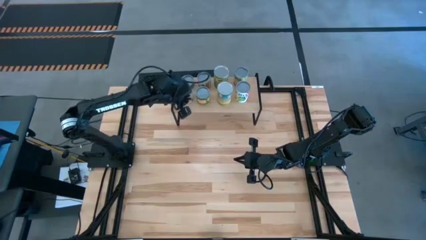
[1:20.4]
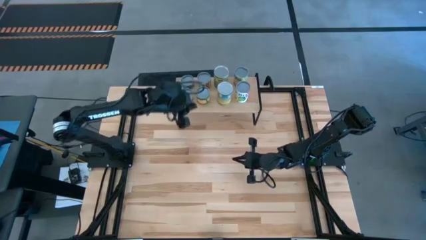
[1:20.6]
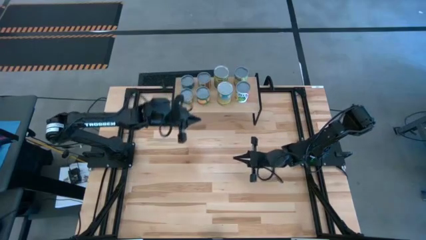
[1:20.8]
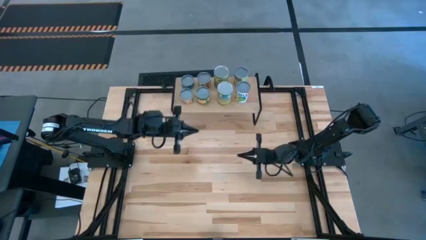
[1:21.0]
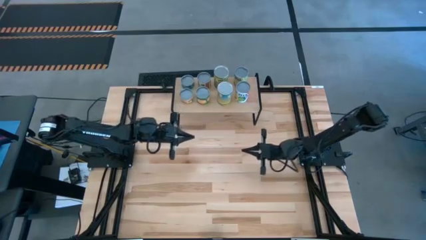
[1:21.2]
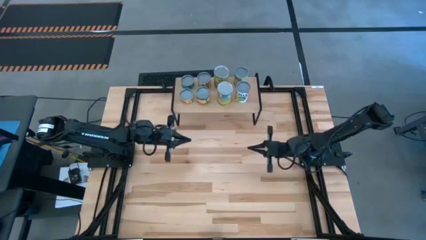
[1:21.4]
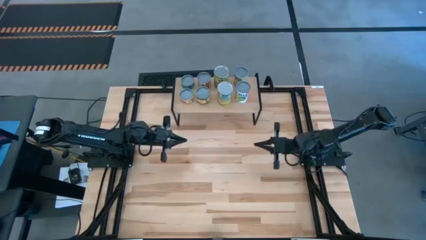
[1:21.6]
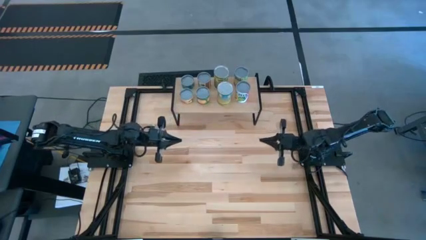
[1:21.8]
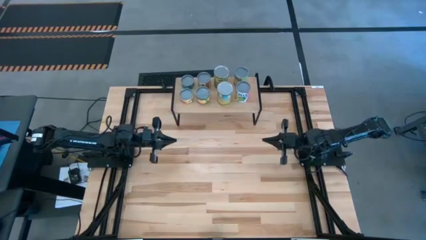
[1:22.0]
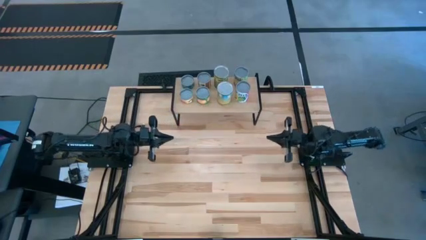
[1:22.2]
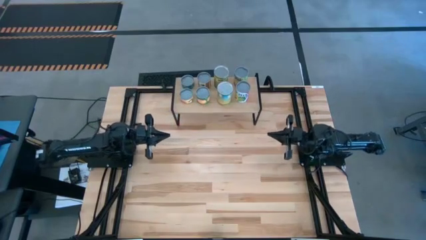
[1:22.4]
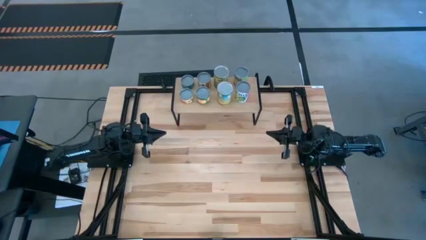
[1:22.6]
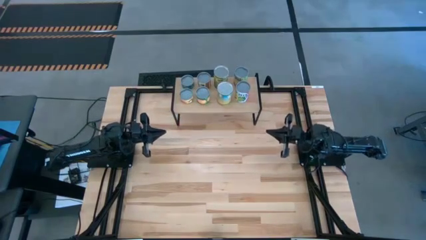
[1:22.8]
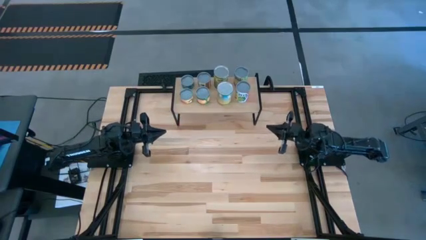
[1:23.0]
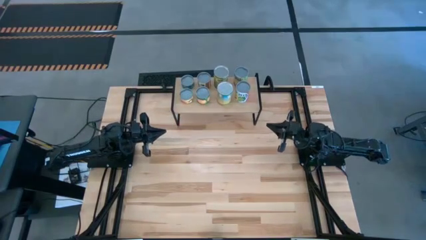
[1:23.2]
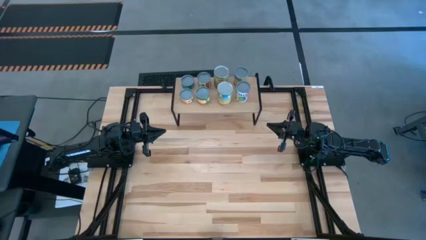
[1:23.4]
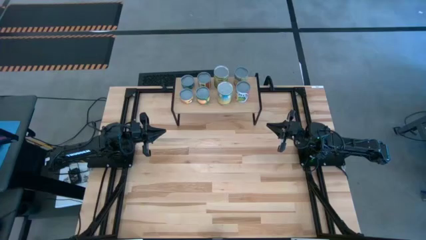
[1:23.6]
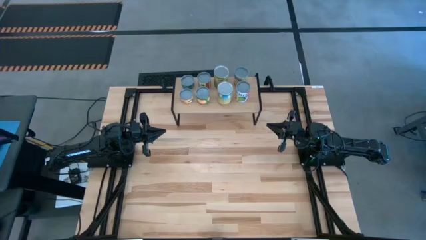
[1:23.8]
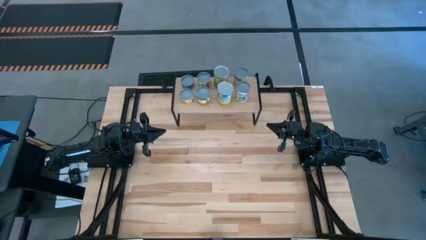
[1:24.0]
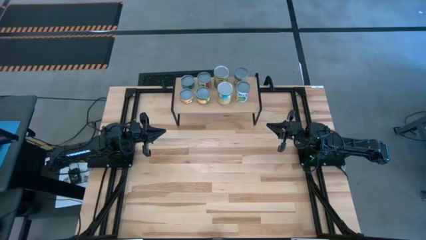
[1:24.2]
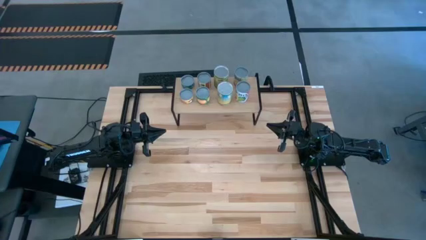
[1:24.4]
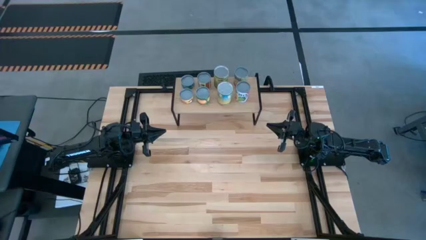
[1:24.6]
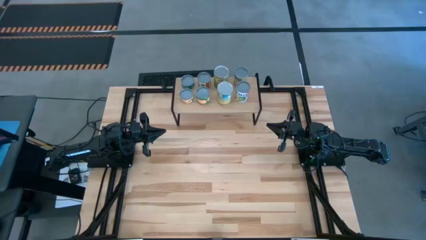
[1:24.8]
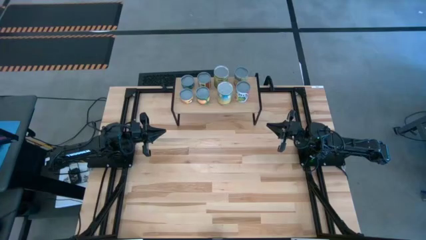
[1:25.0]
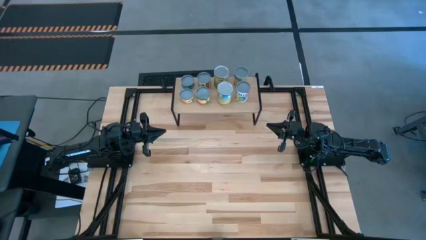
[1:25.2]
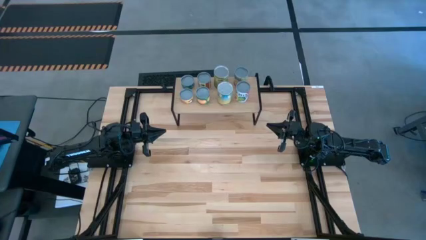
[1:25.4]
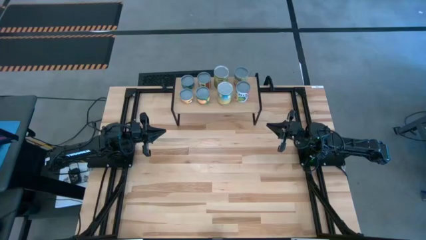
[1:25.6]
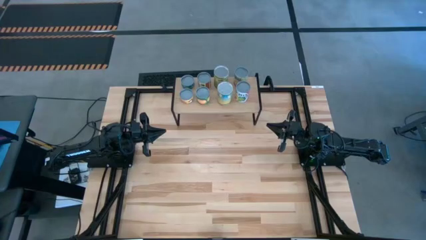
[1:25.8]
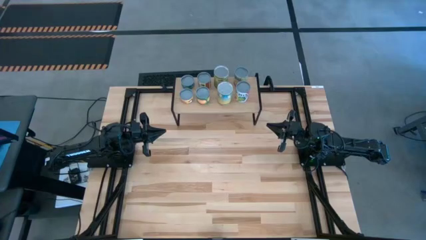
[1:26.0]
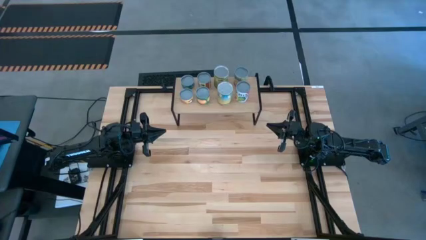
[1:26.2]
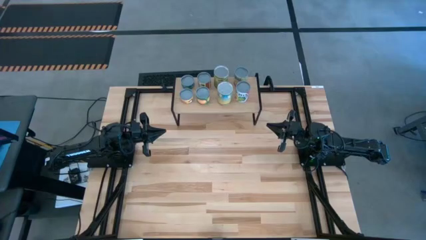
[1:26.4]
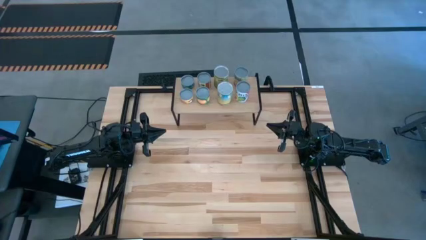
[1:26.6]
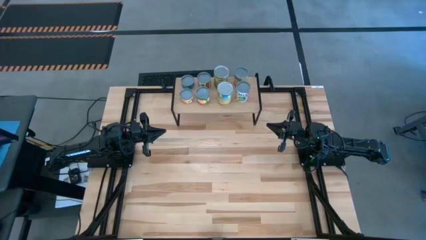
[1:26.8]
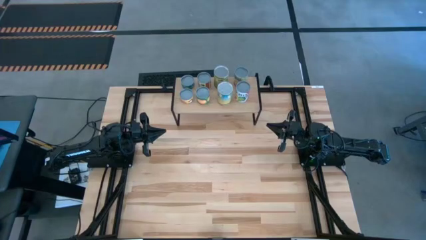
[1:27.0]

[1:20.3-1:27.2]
Task: Pick and place cans onto a shelf
Return to Home Position

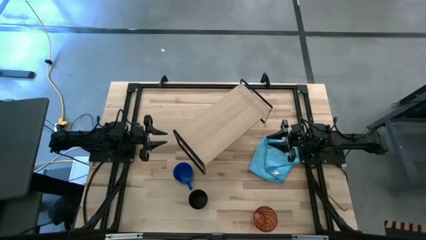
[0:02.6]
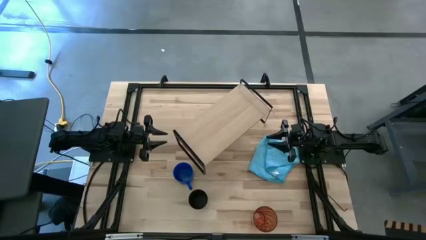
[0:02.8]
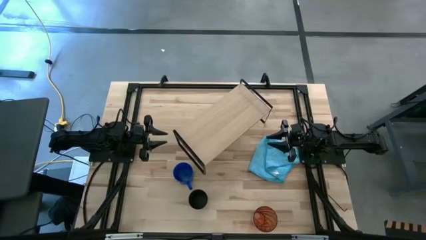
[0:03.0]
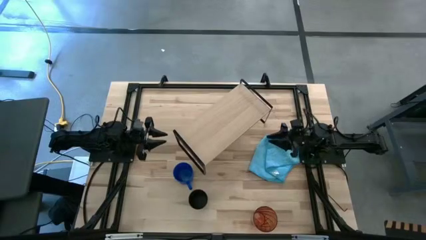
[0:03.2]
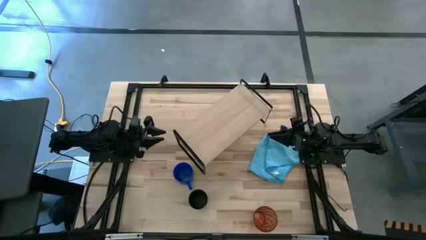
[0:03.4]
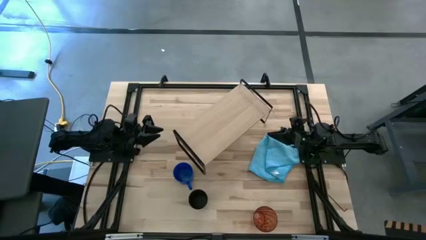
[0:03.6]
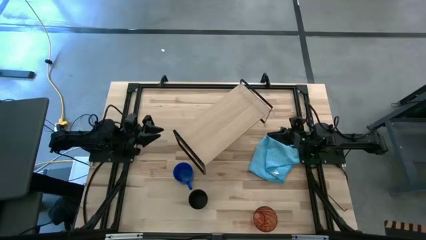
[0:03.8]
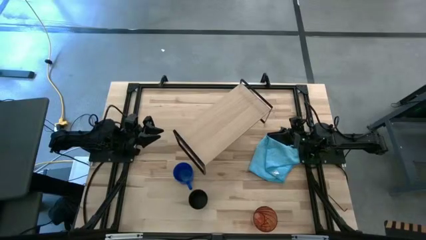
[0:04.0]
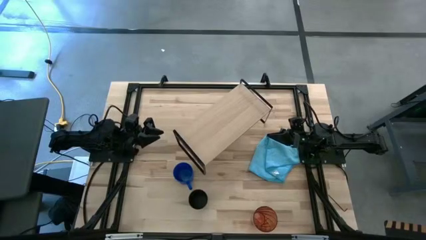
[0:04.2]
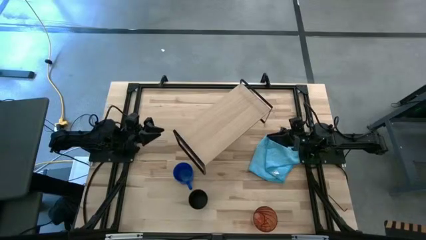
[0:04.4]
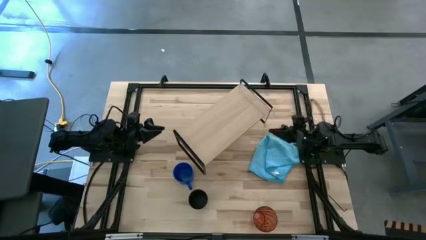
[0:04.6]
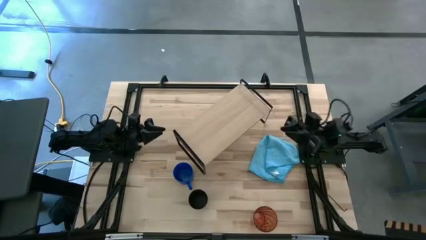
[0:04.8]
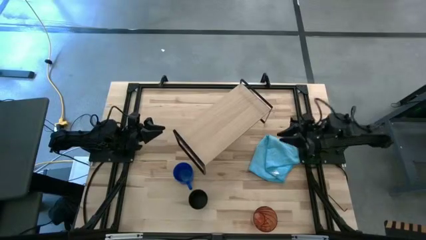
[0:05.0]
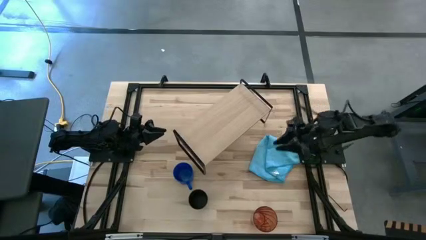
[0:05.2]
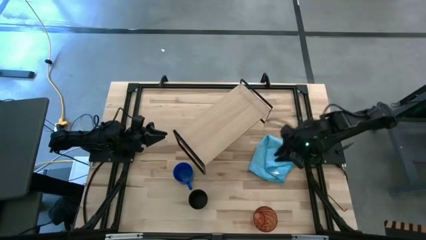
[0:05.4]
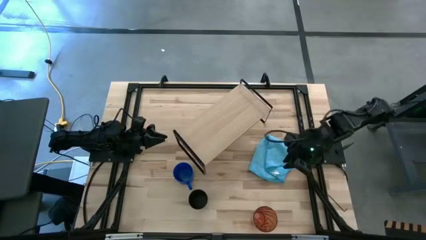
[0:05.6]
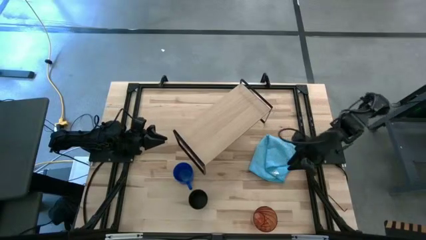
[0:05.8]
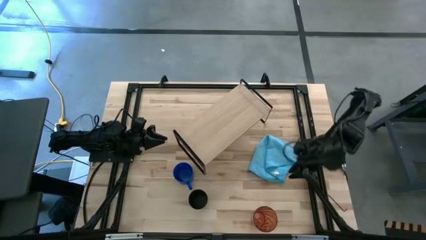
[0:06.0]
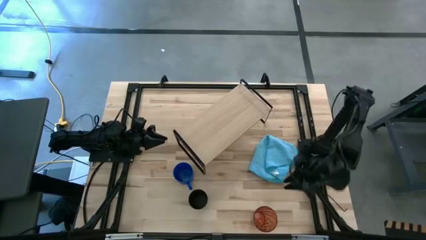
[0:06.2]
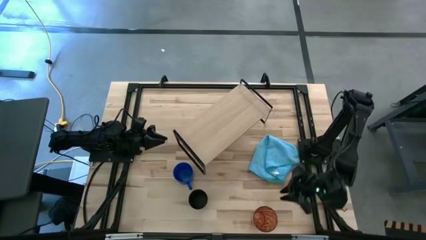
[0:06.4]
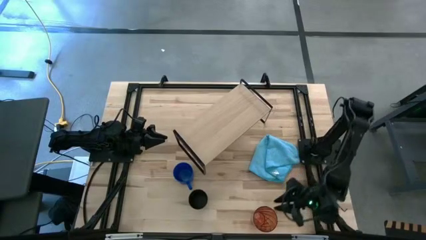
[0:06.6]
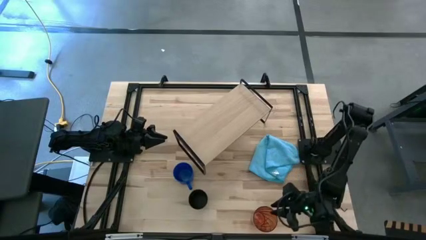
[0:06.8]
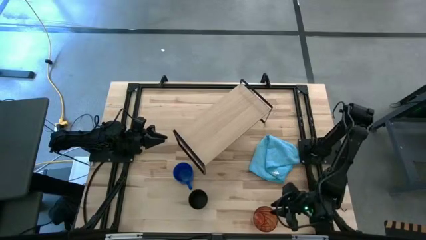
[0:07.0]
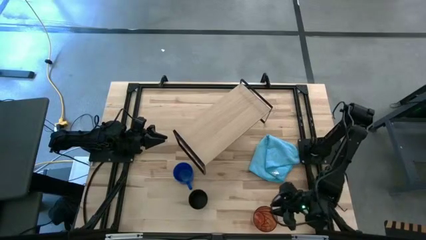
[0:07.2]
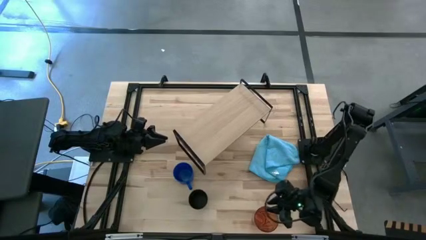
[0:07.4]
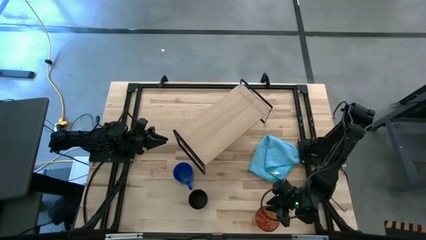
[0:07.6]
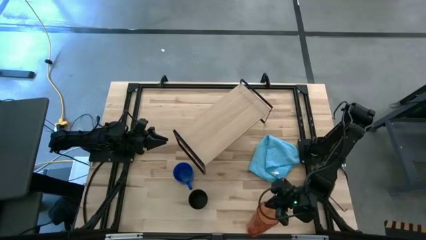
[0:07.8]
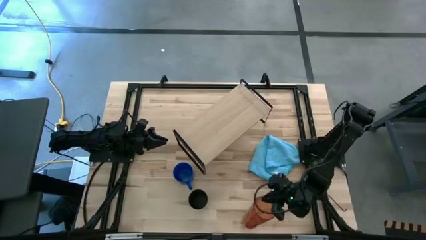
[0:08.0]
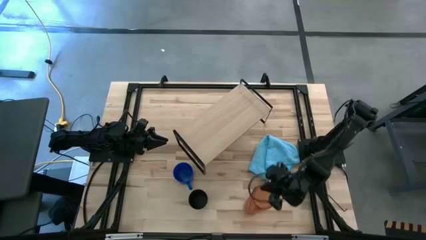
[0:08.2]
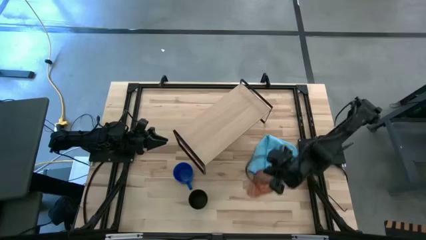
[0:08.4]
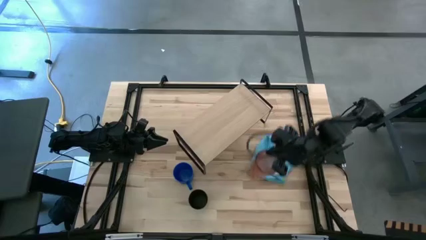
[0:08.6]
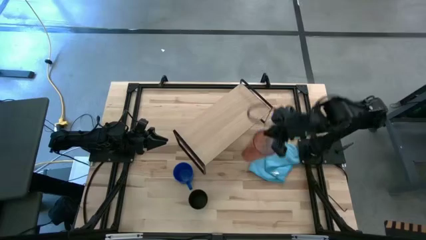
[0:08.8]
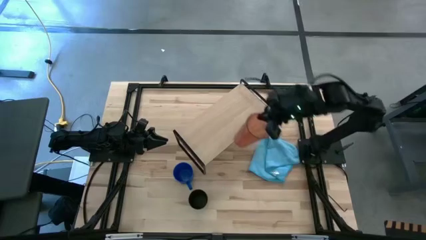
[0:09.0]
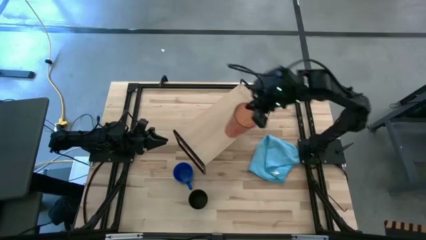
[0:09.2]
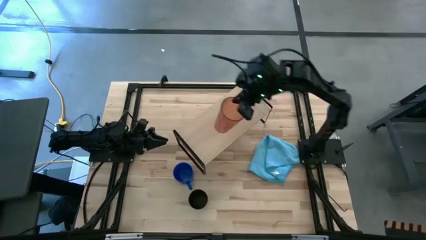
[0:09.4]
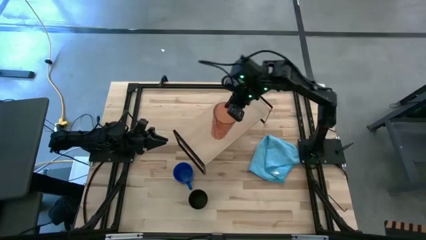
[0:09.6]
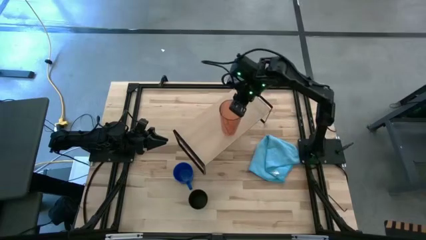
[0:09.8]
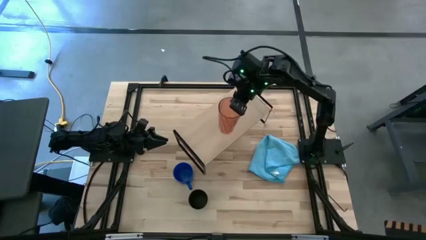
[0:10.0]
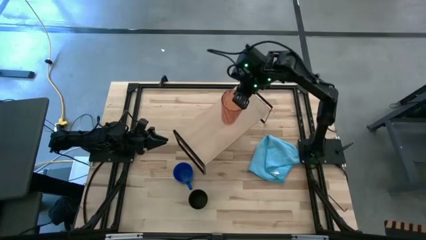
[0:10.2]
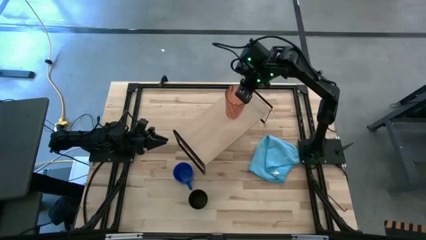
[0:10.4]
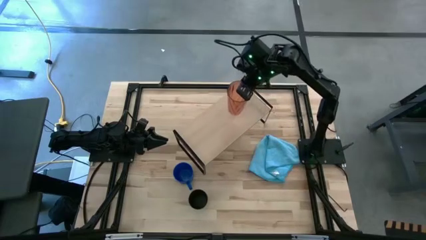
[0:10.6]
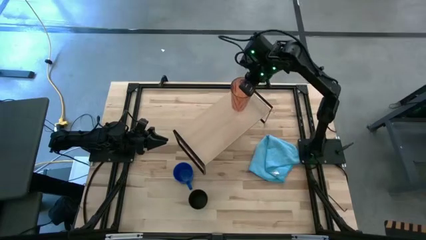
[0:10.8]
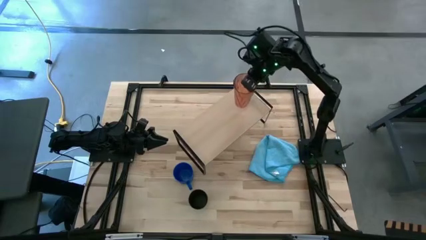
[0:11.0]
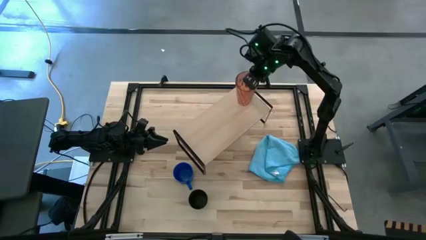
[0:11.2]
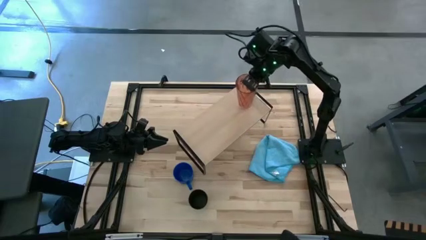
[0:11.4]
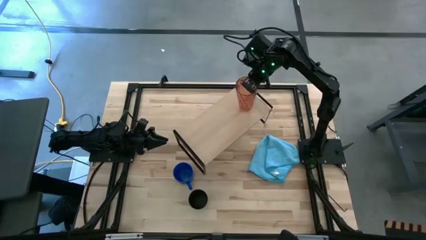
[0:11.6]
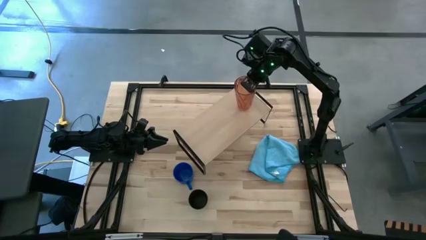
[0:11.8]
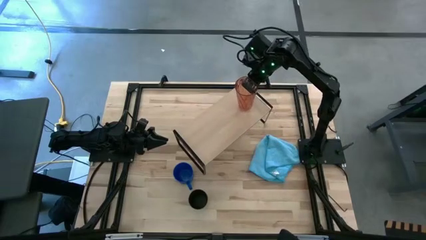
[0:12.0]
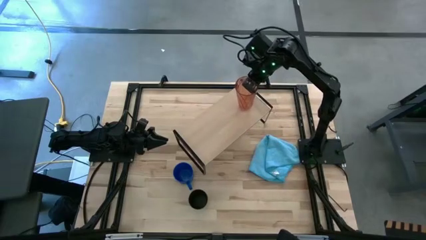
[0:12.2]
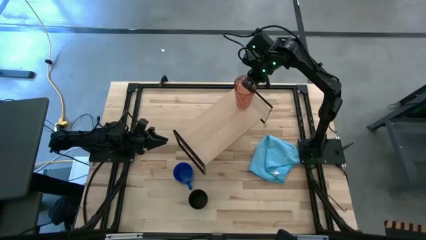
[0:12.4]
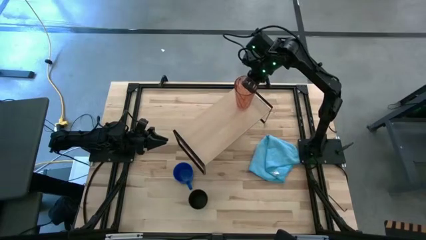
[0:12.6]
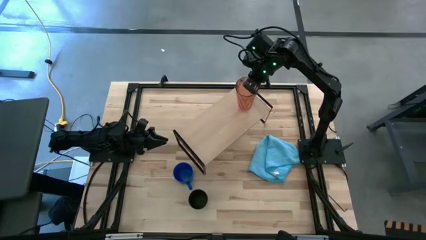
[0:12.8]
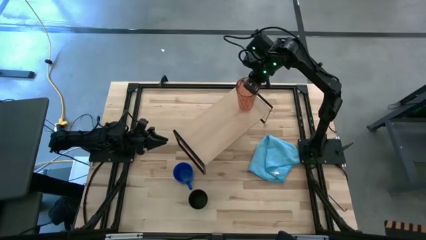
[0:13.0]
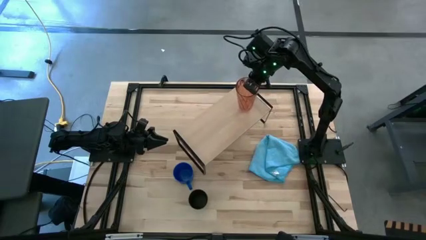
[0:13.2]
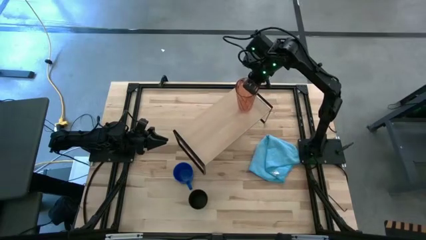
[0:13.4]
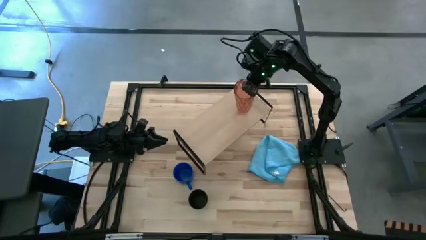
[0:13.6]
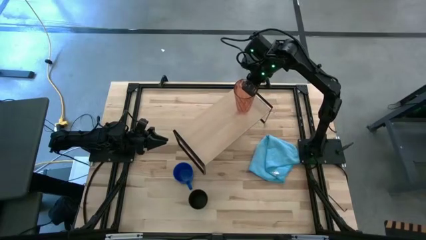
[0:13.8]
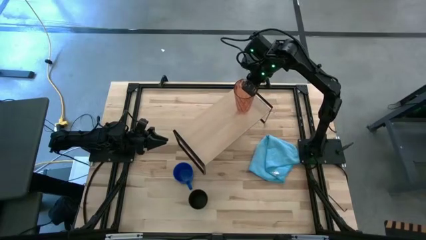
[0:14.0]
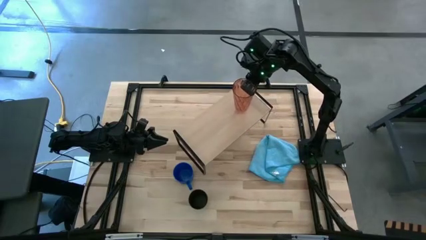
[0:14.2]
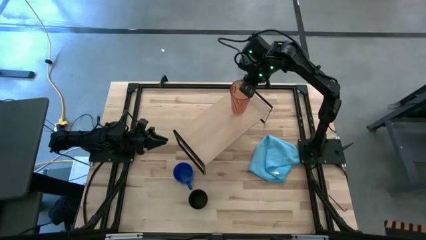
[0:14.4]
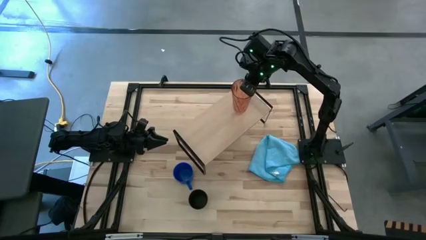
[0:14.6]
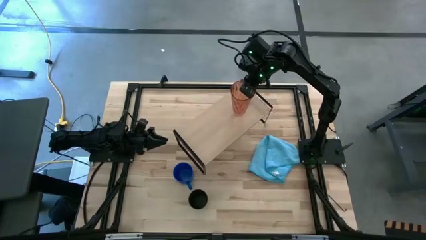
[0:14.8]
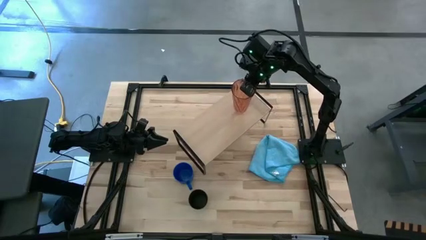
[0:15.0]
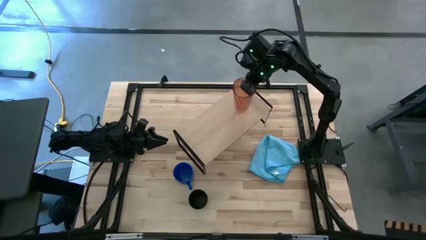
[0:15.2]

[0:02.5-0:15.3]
Task: Stack small to large cups/mugs on shelf
Put the orange glass on the shelf
